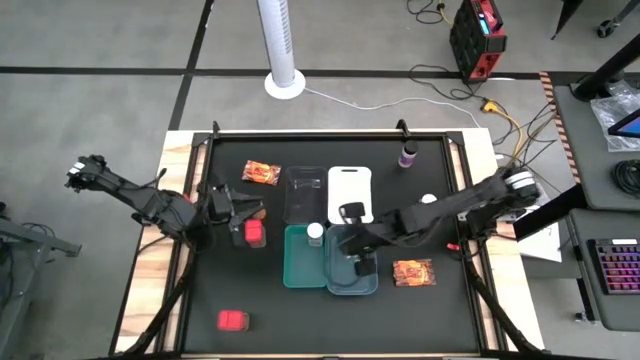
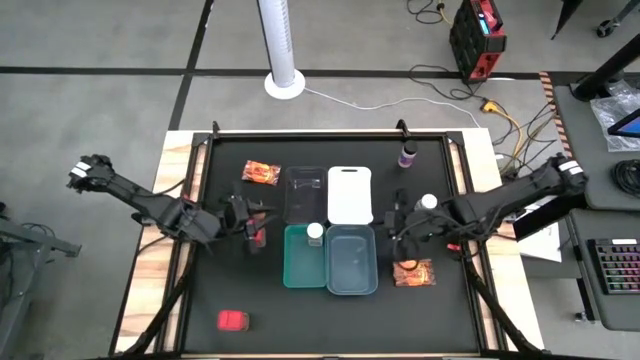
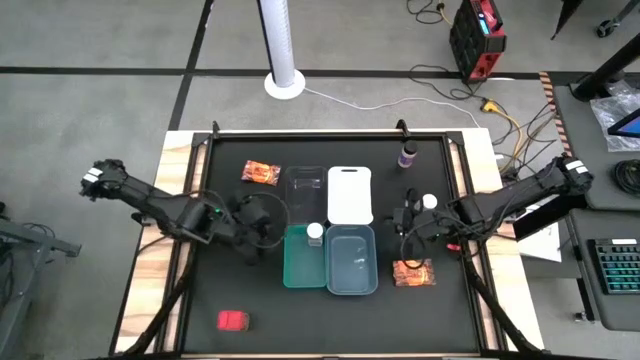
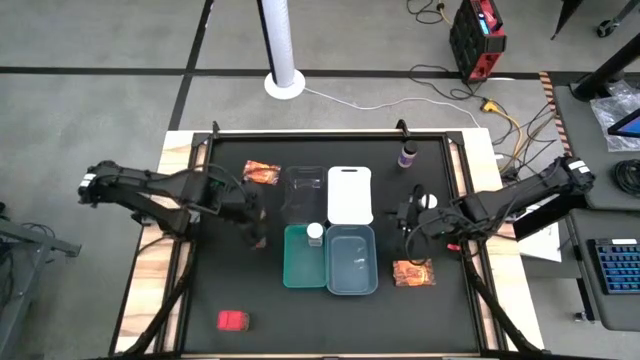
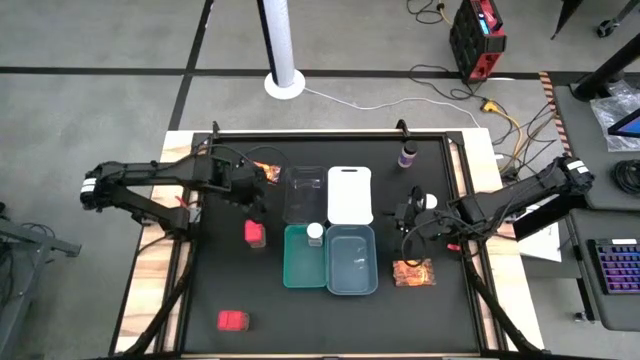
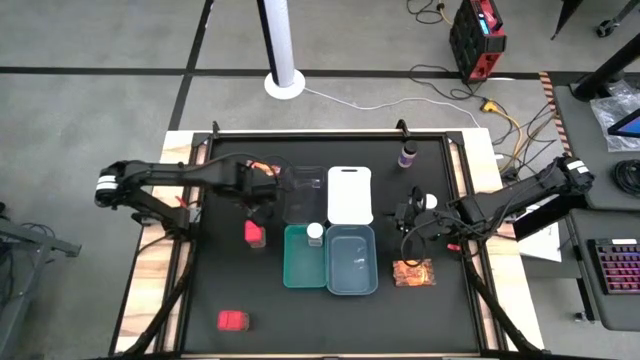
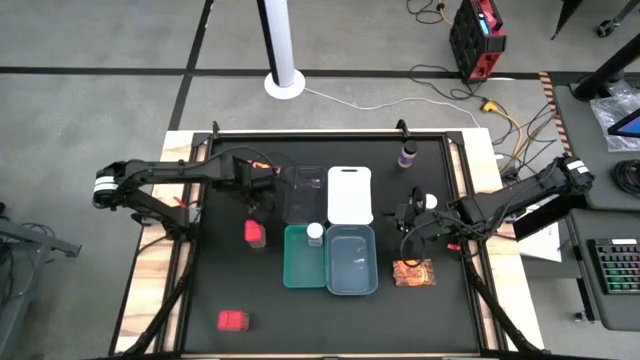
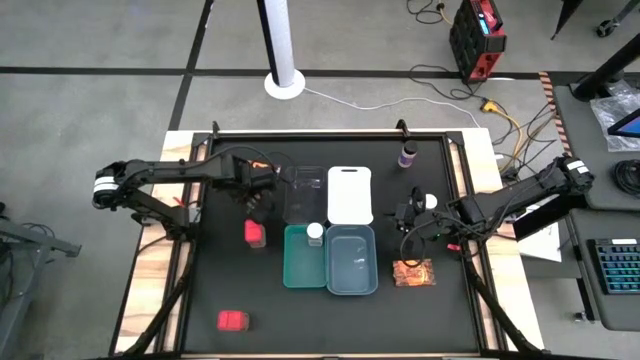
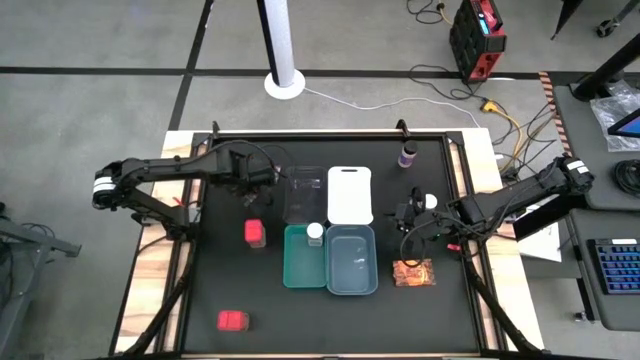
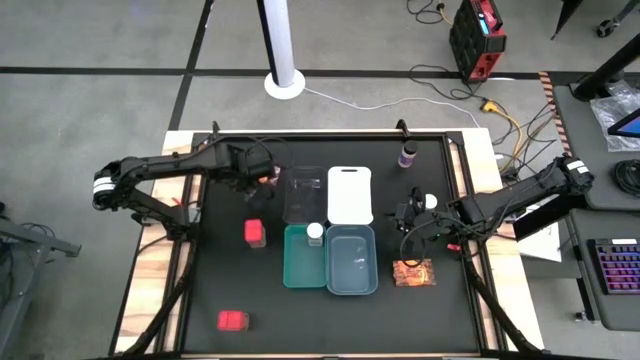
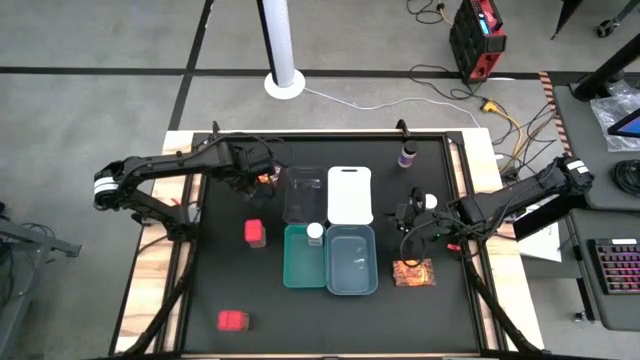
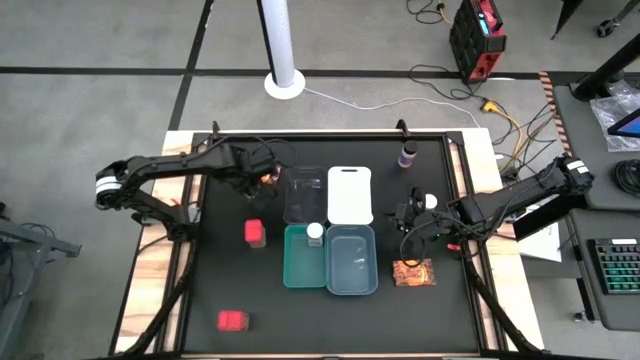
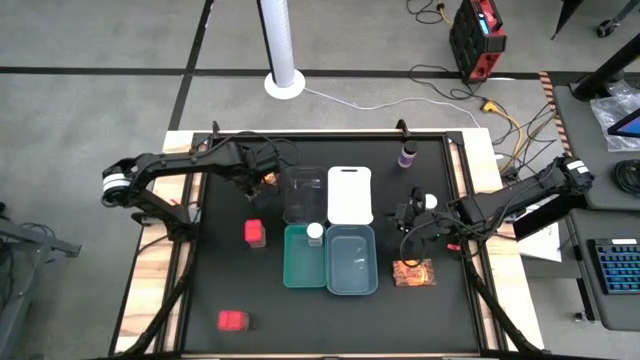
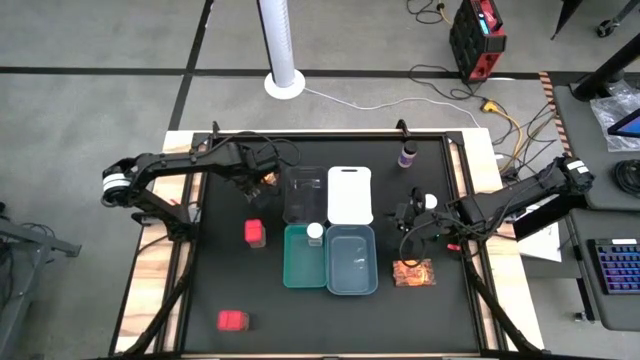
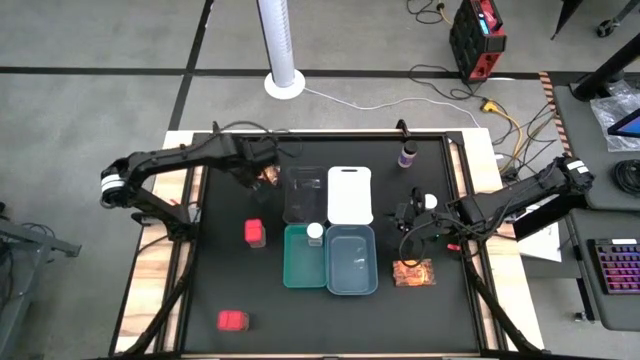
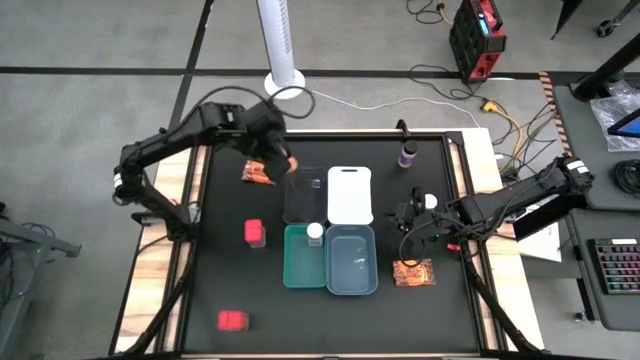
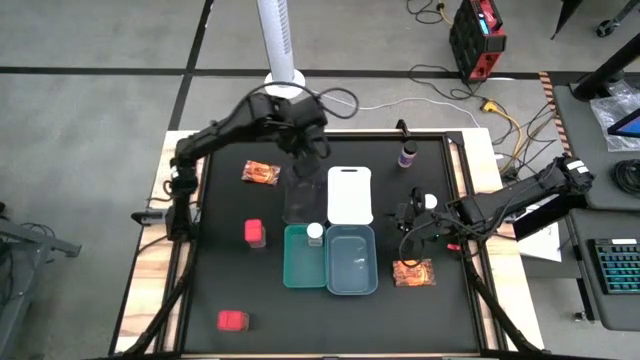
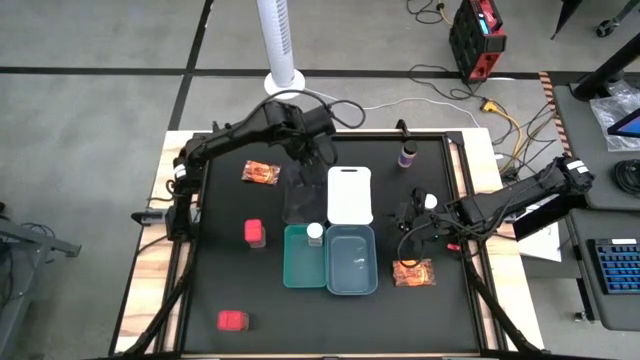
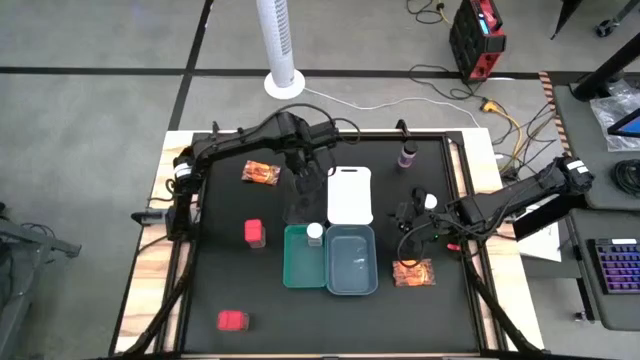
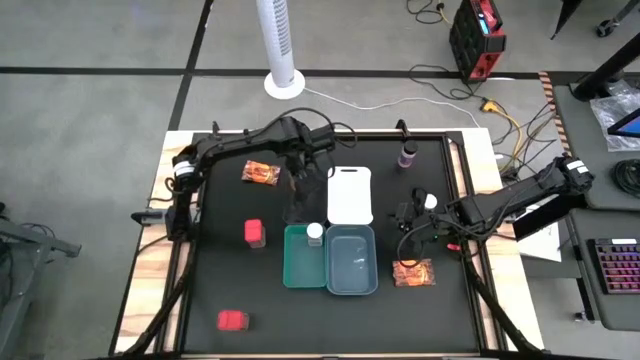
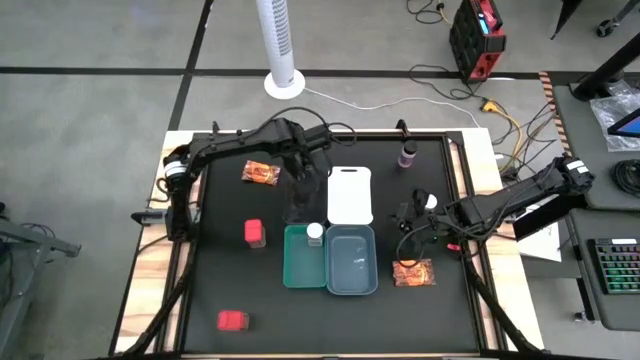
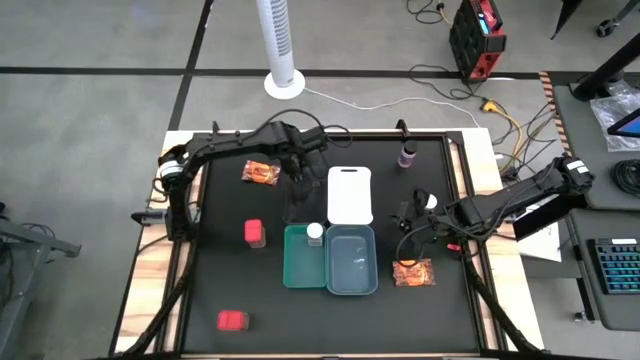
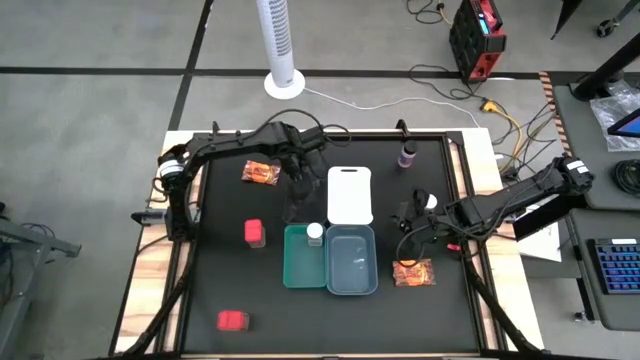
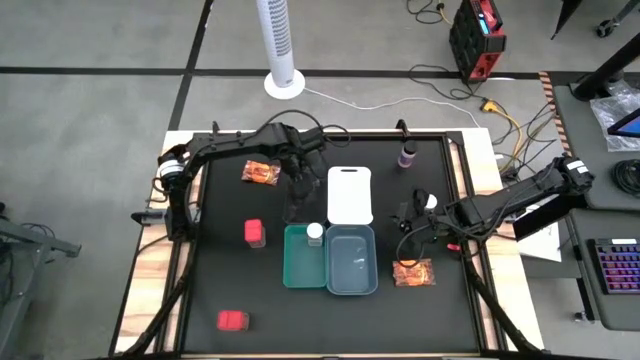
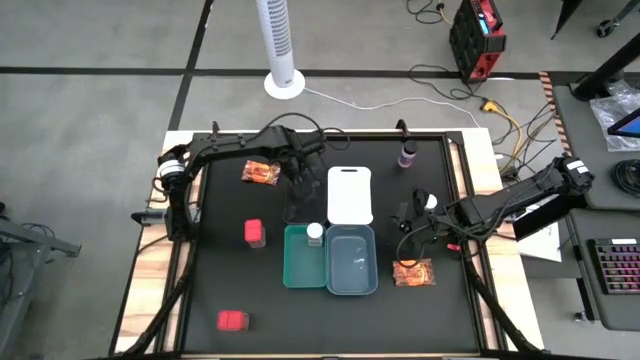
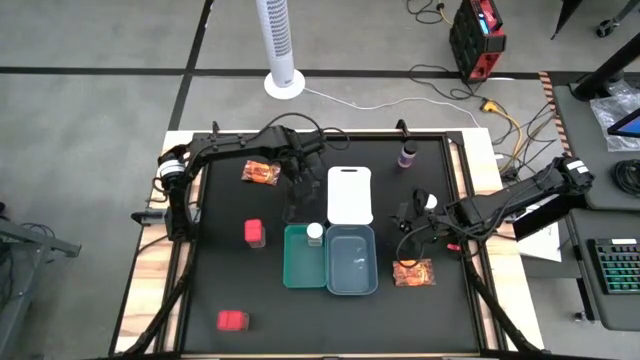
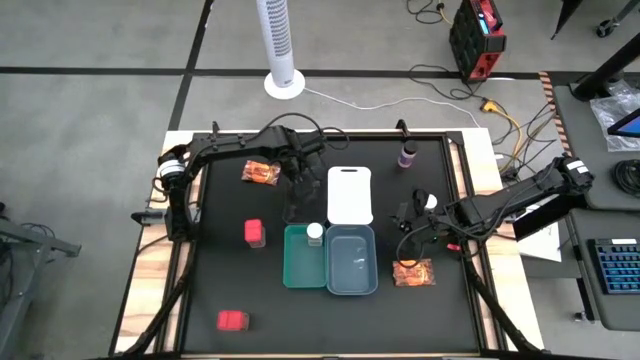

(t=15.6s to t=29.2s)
Task: Sort spices by type
Put the left black seasoning bottle into the black bin

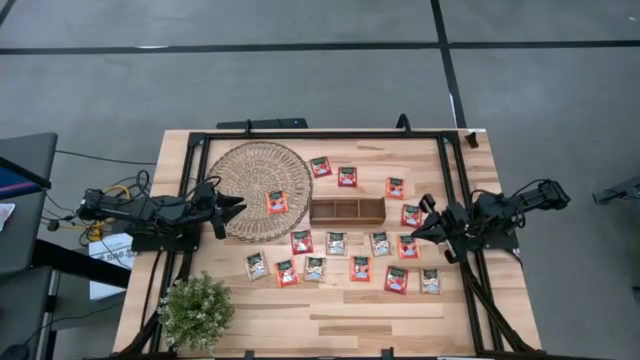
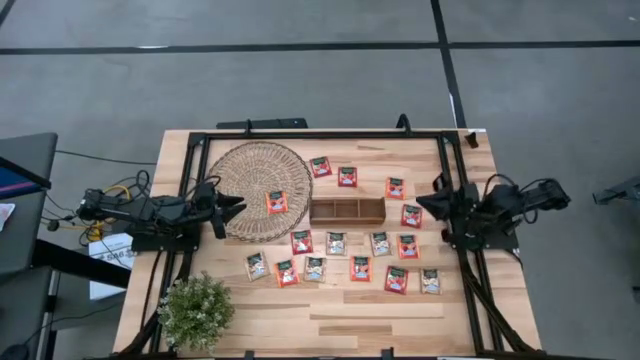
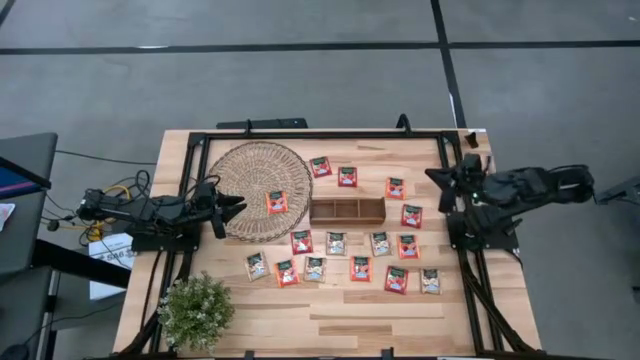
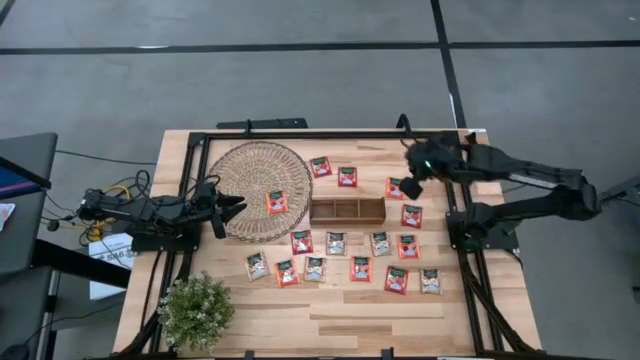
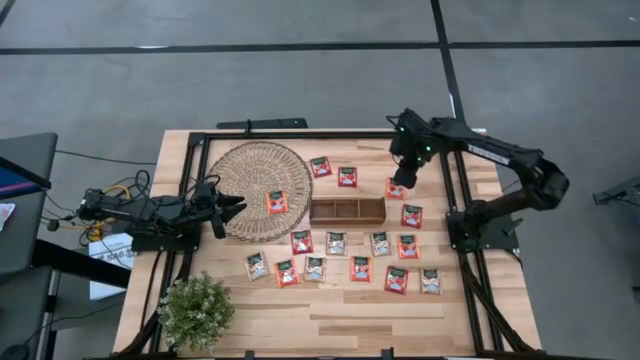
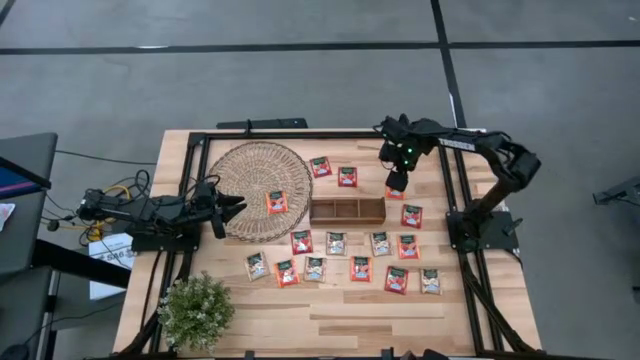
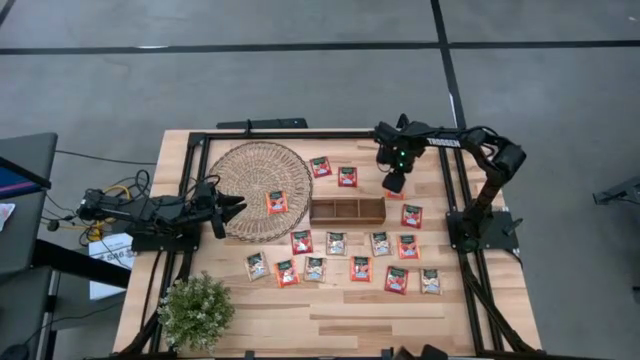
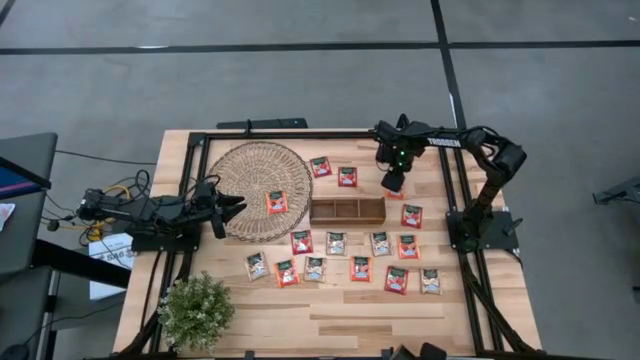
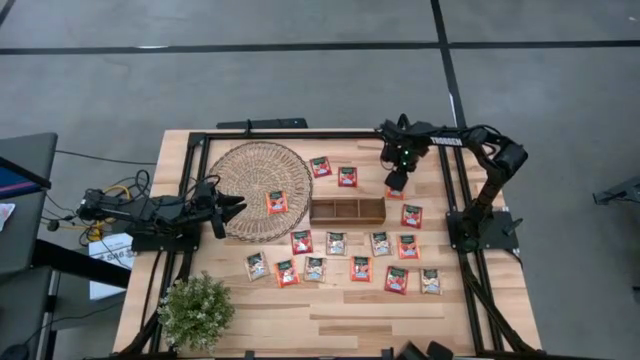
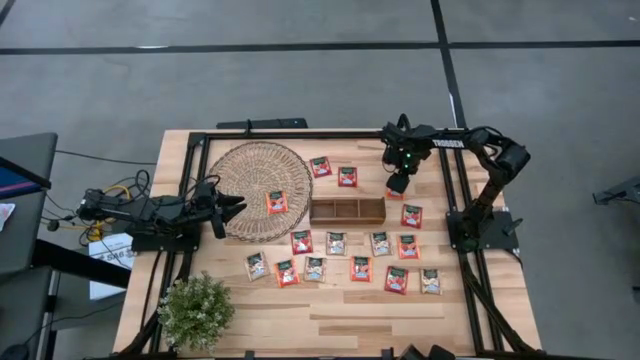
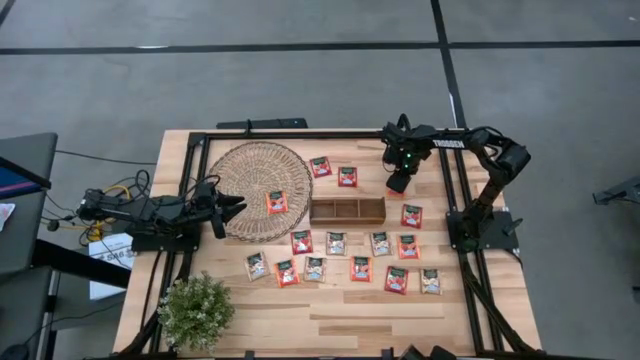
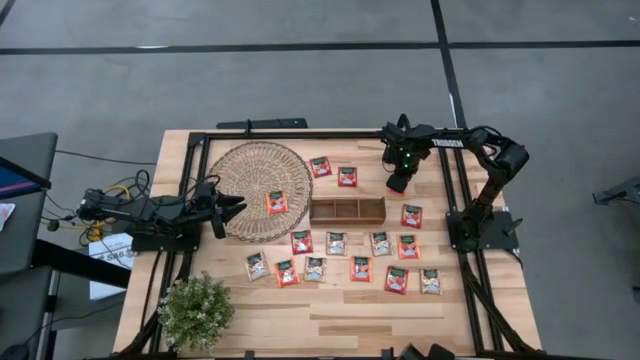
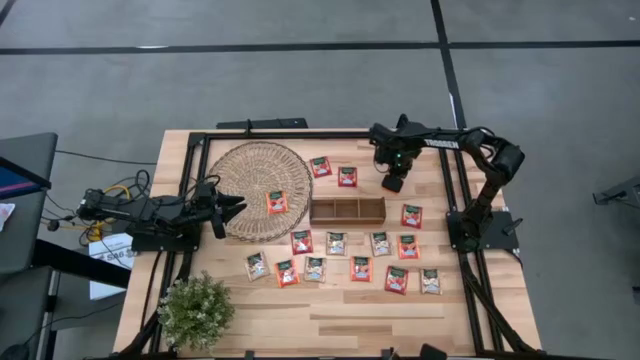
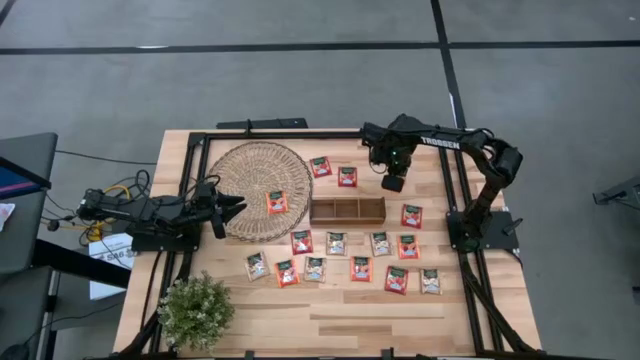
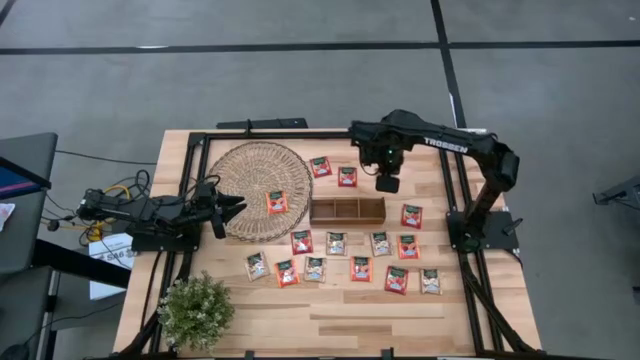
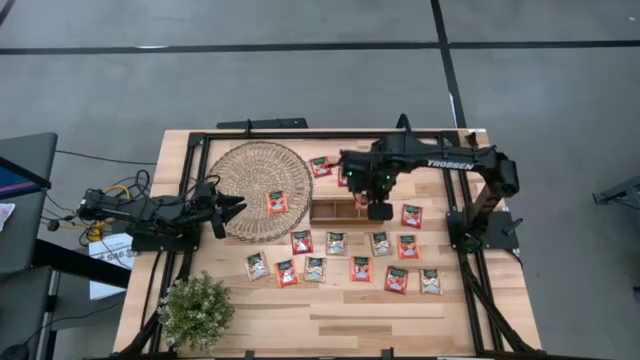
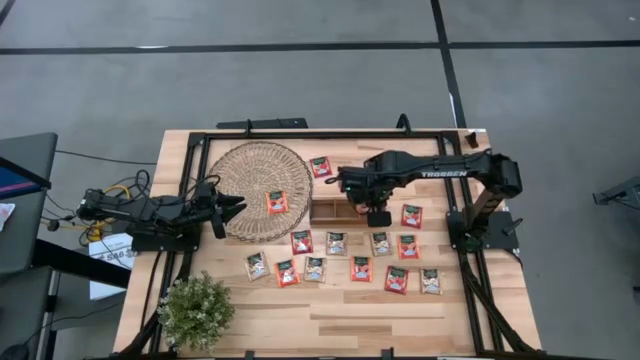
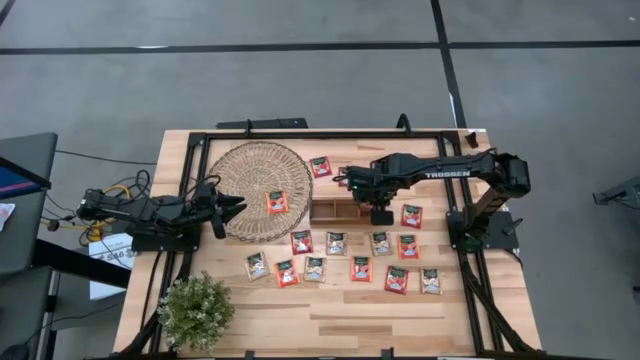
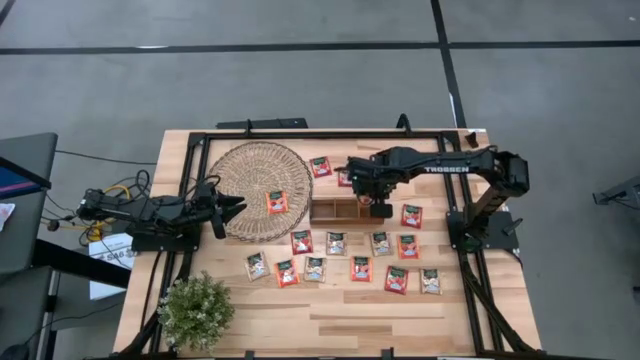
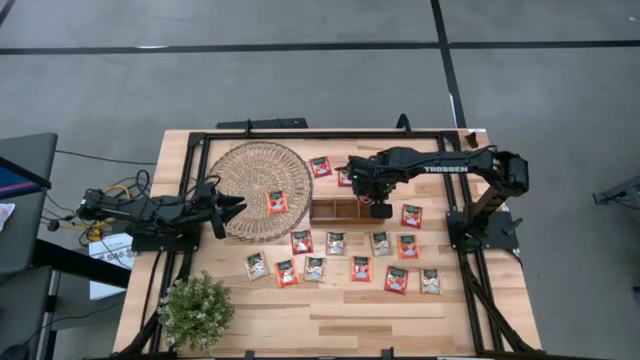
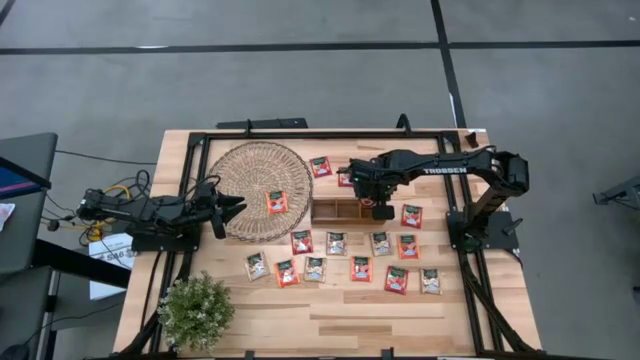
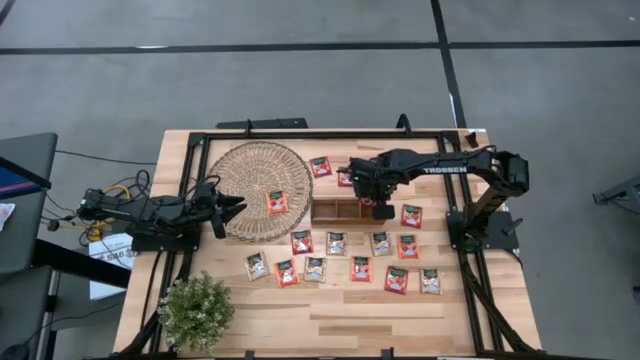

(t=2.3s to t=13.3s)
Task: Pick & Place Tea
Put the orange tea bag into the right section of the wooden organizer
